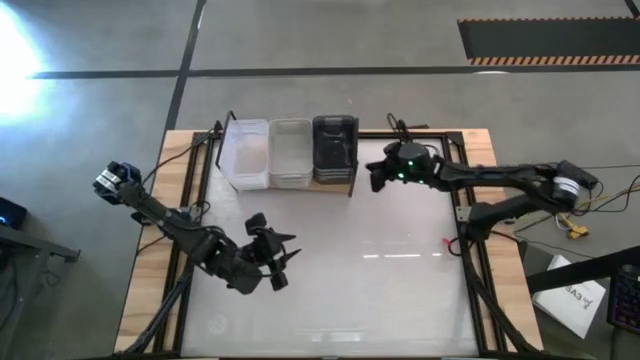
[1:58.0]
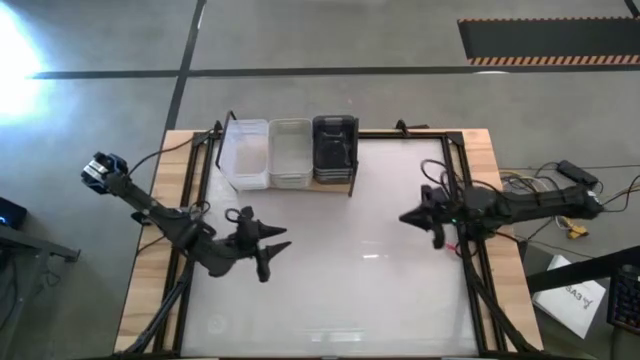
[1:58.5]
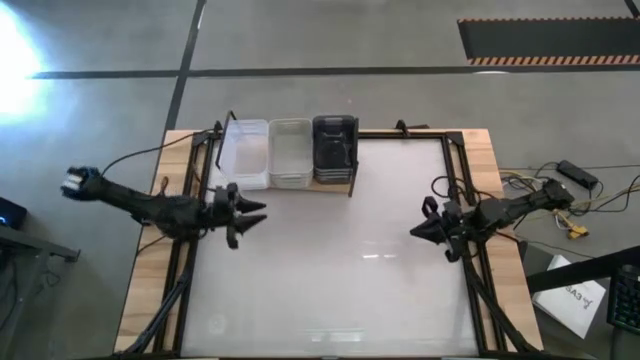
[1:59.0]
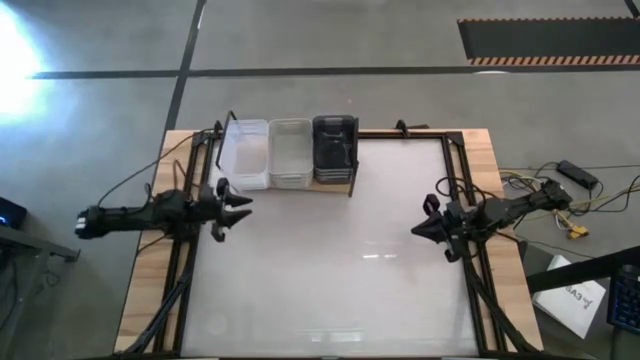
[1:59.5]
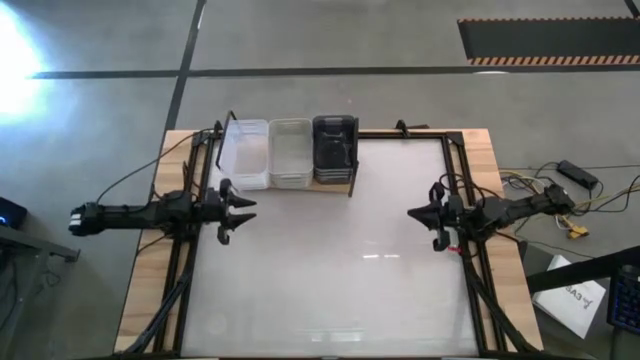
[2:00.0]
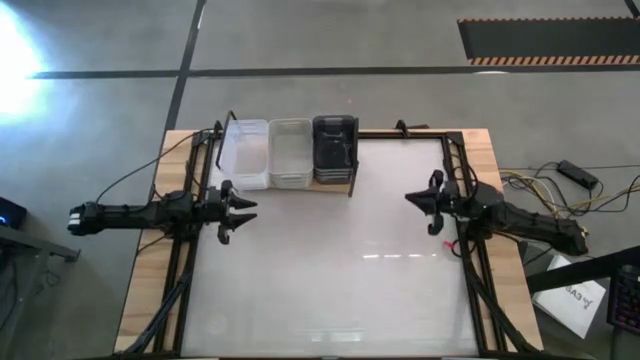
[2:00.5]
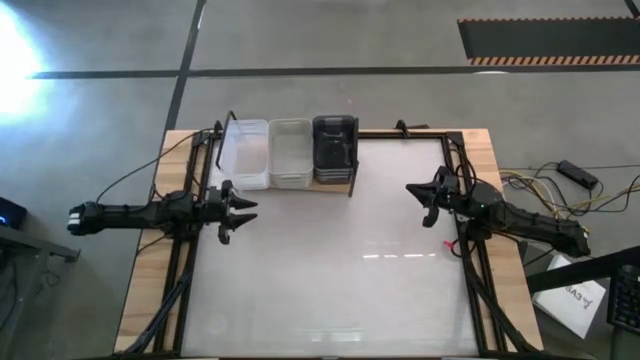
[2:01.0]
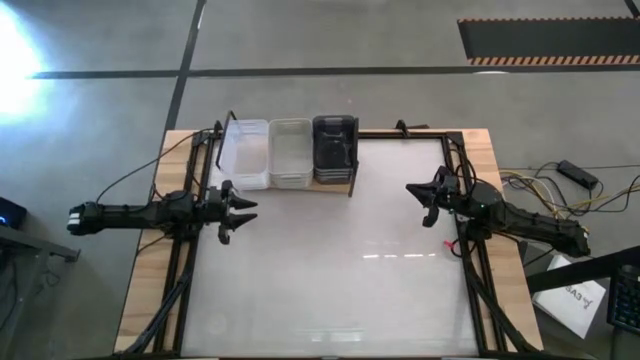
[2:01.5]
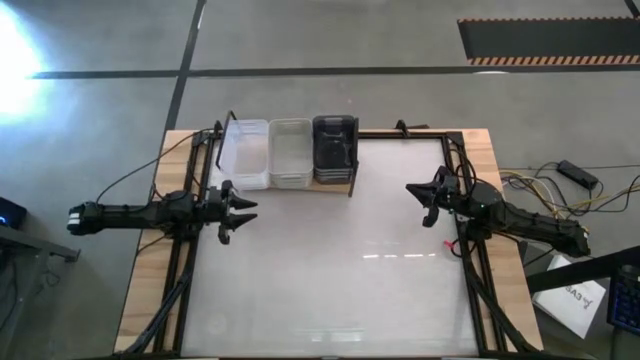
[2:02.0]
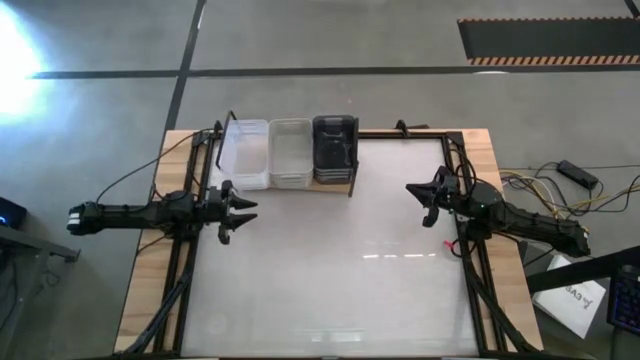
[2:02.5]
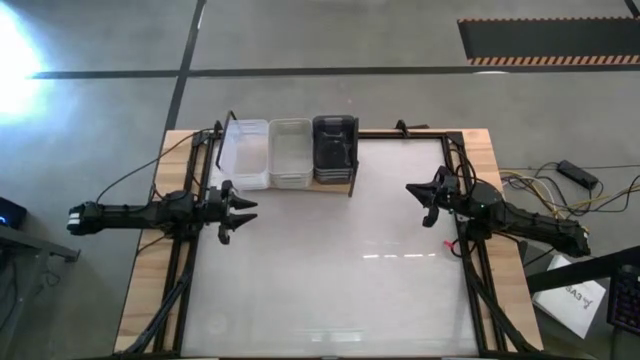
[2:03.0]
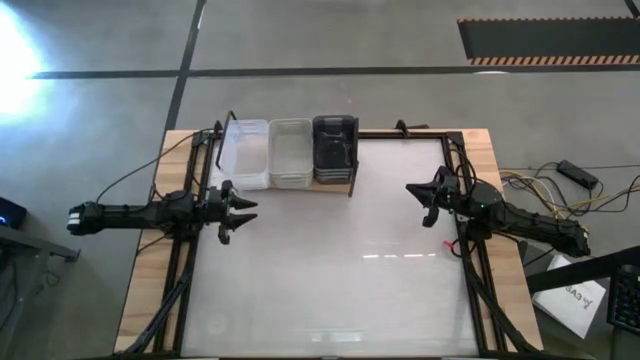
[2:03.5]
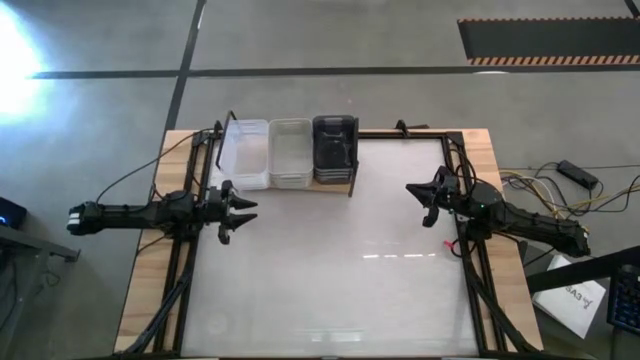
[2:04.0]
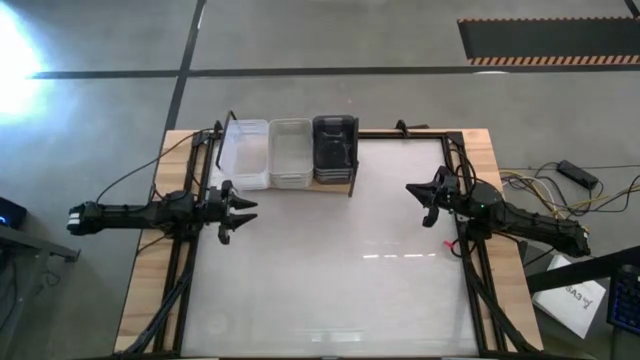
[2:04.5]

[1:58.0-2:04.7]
Task: Stack baskets on shelf by color
Return to Home Position

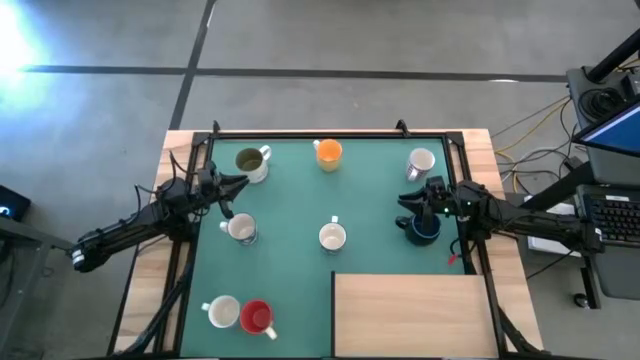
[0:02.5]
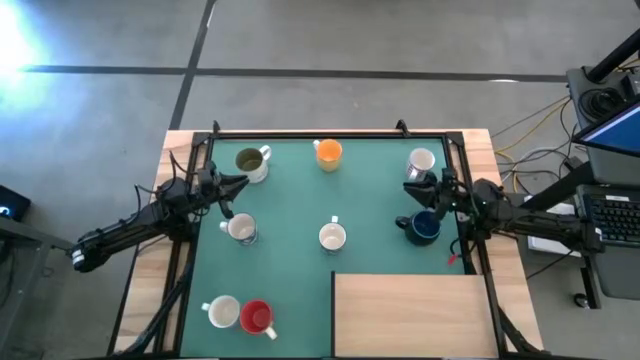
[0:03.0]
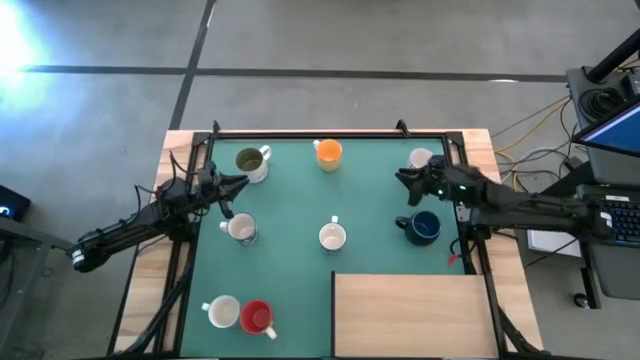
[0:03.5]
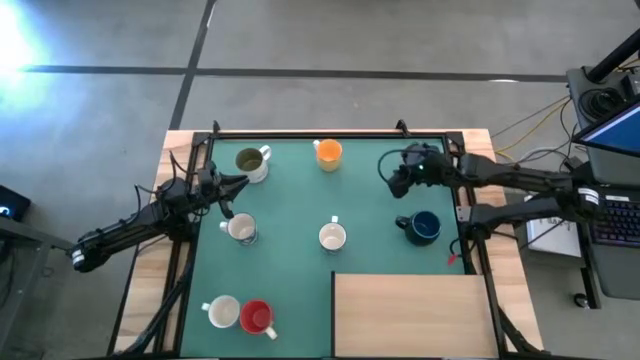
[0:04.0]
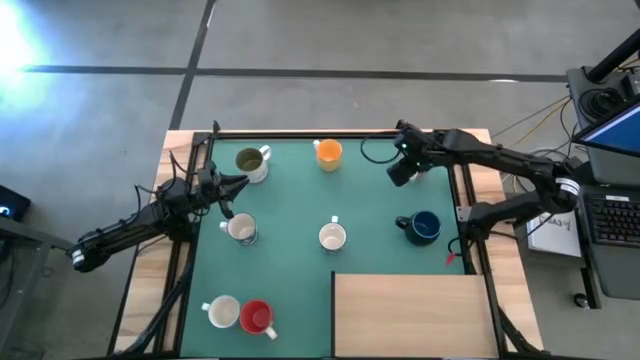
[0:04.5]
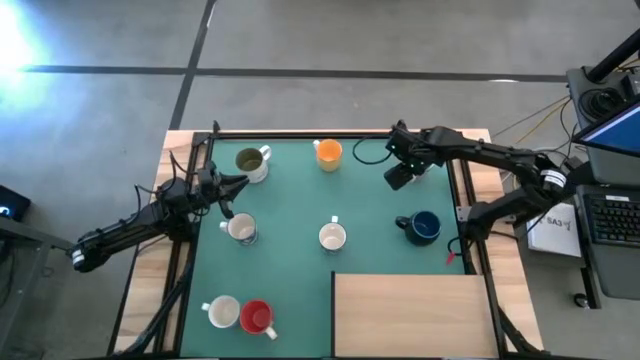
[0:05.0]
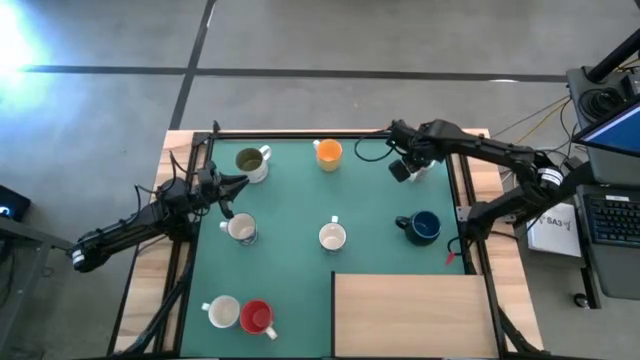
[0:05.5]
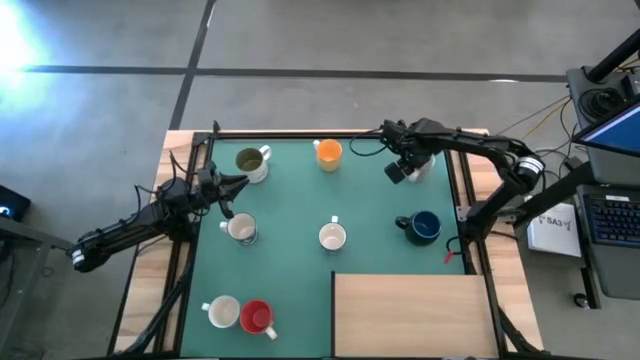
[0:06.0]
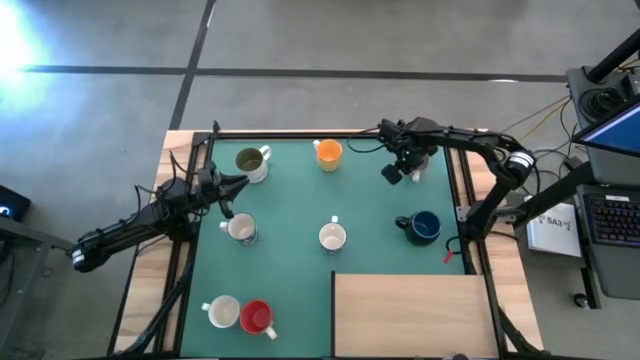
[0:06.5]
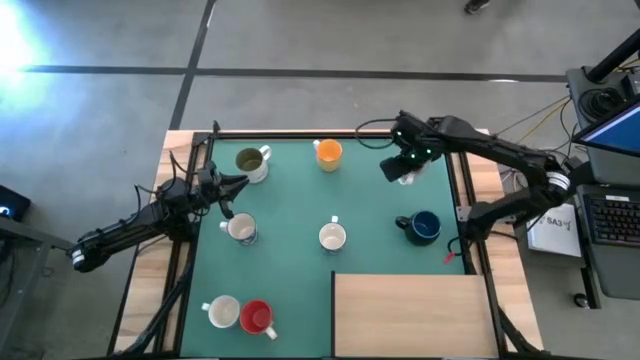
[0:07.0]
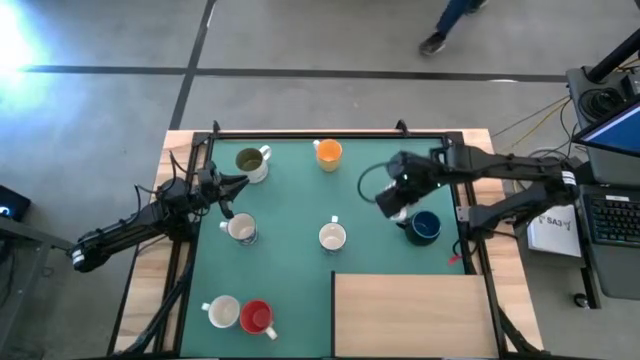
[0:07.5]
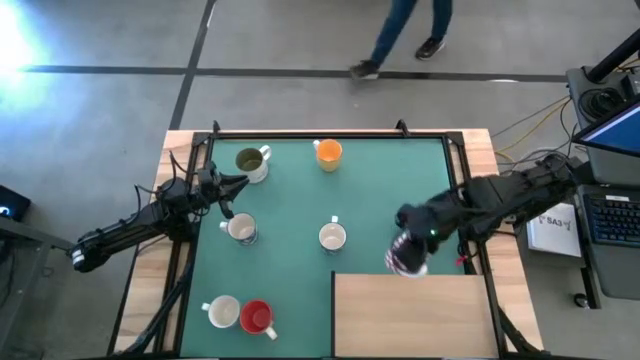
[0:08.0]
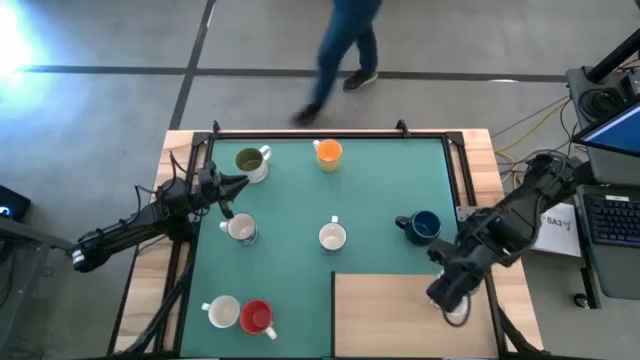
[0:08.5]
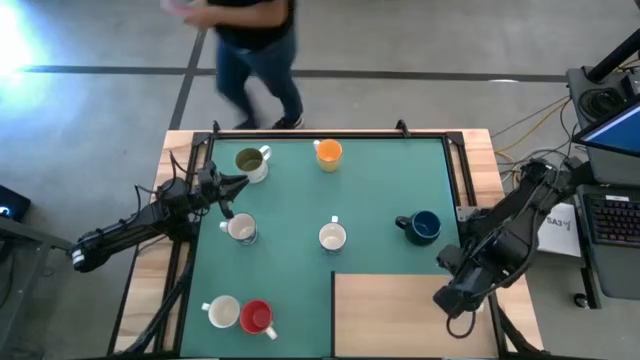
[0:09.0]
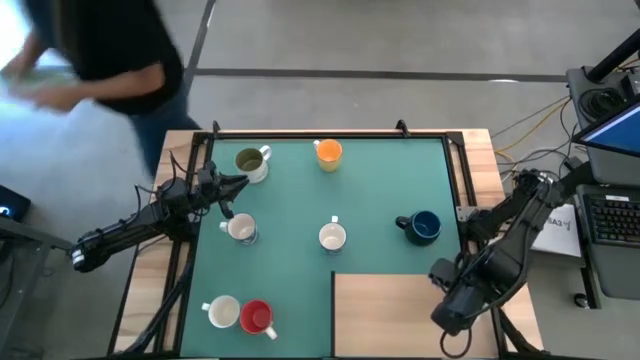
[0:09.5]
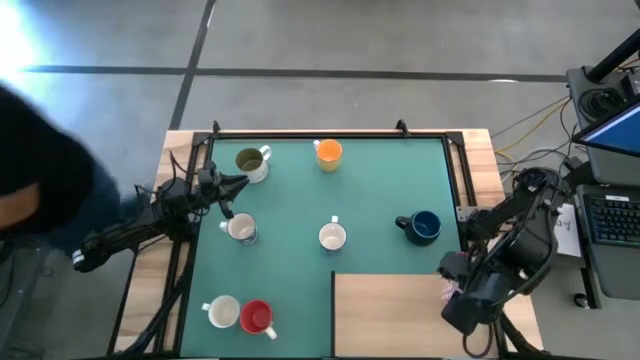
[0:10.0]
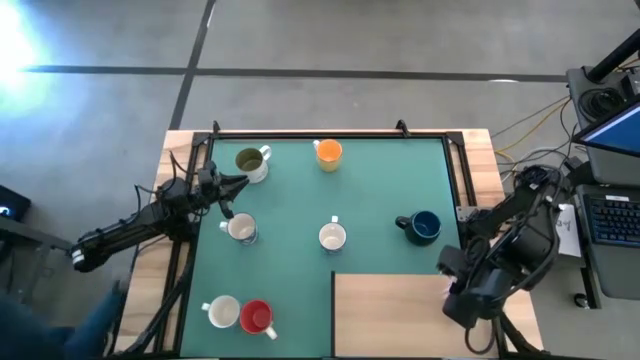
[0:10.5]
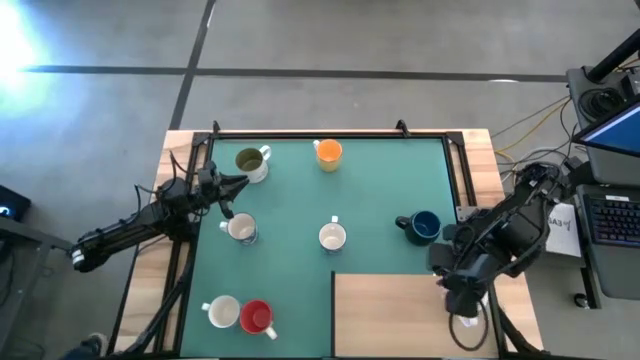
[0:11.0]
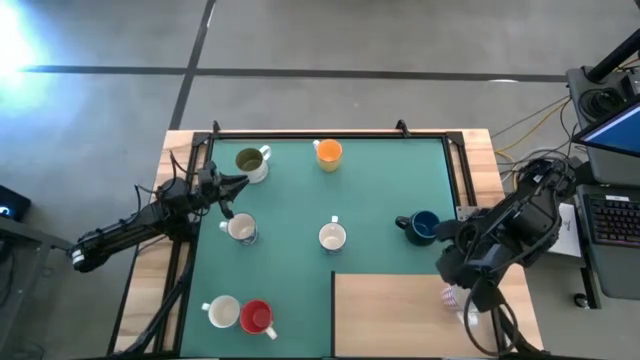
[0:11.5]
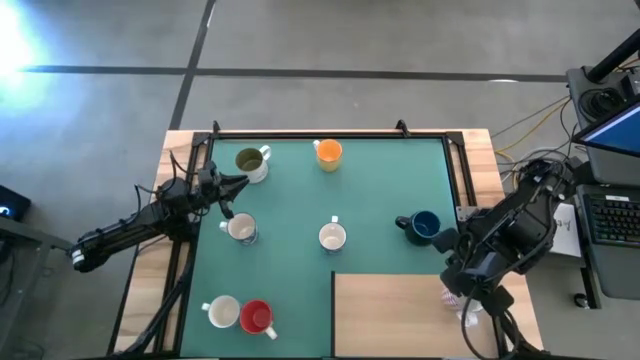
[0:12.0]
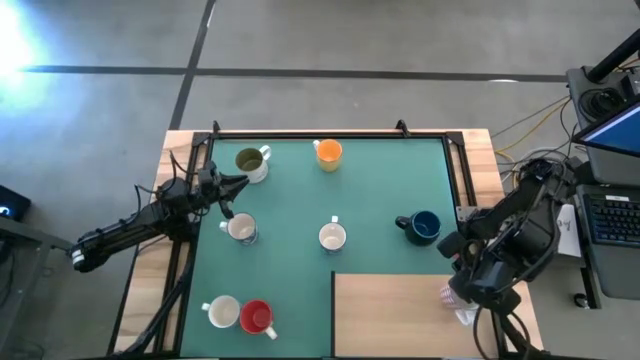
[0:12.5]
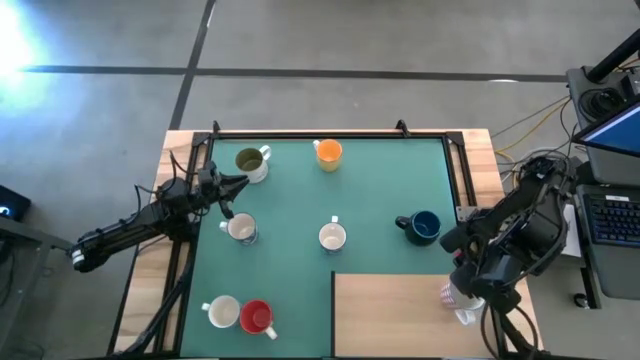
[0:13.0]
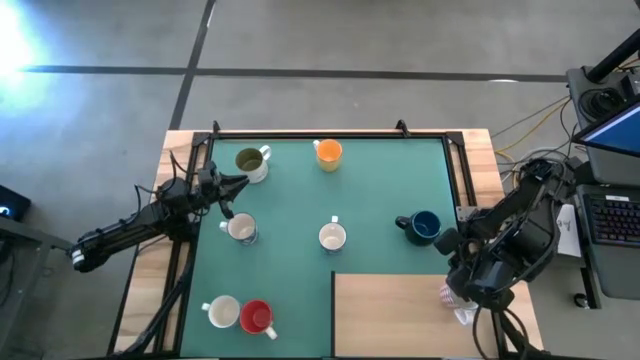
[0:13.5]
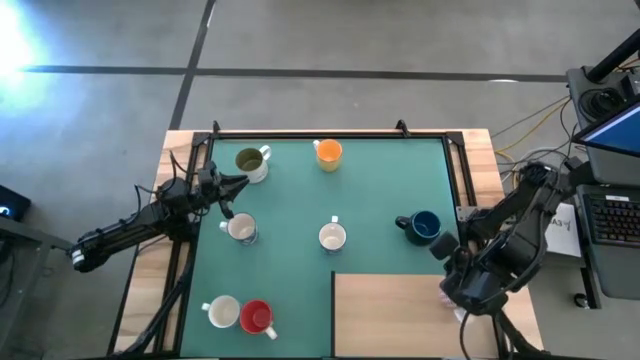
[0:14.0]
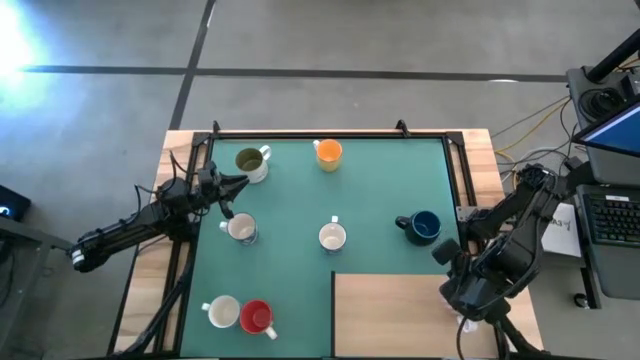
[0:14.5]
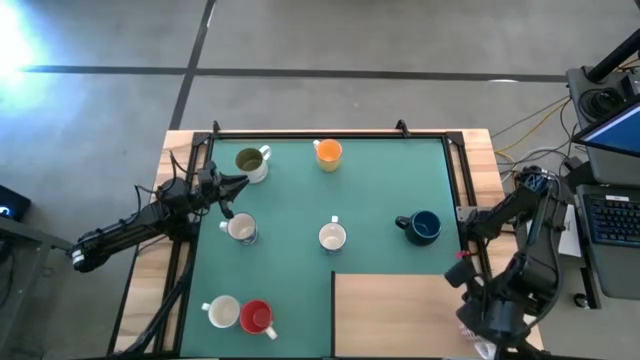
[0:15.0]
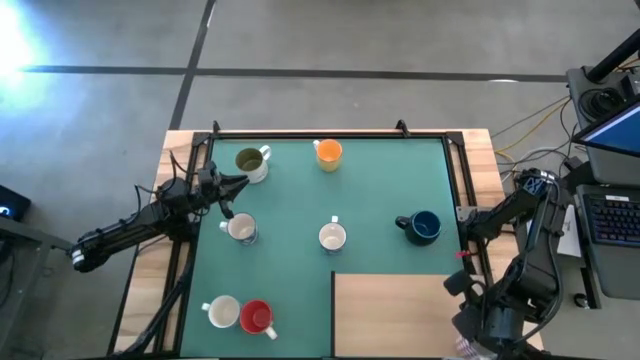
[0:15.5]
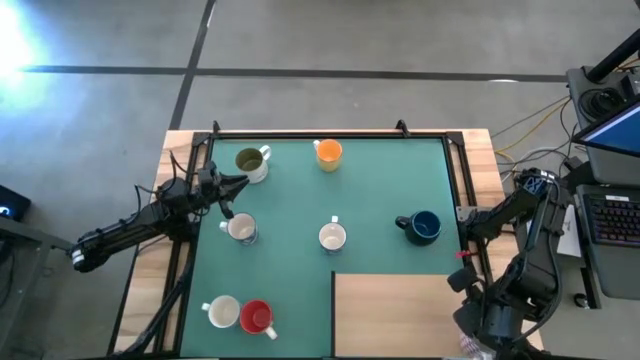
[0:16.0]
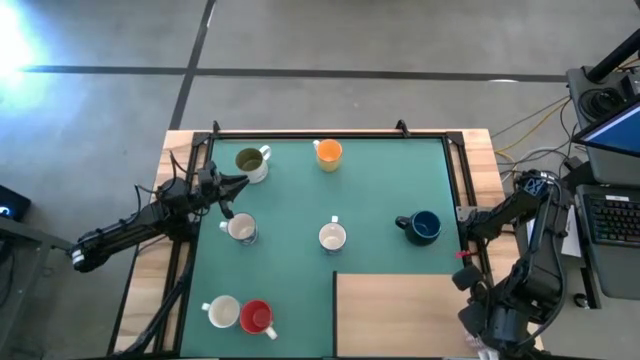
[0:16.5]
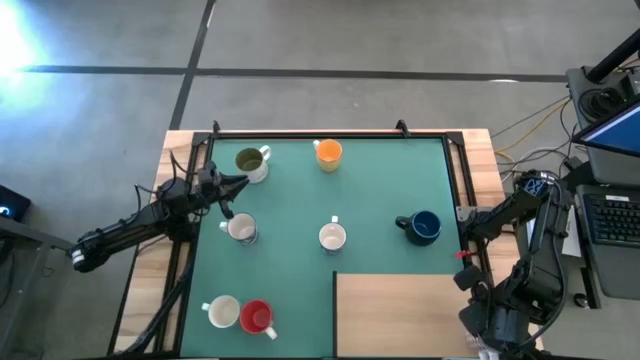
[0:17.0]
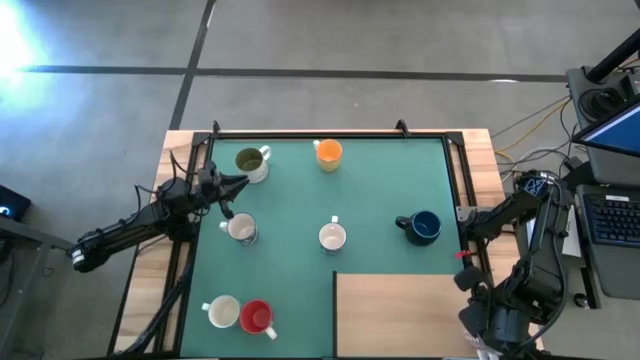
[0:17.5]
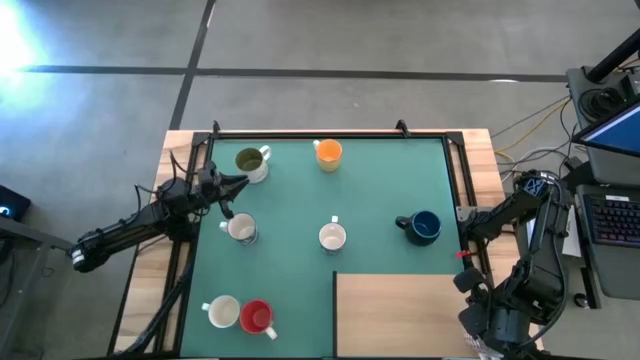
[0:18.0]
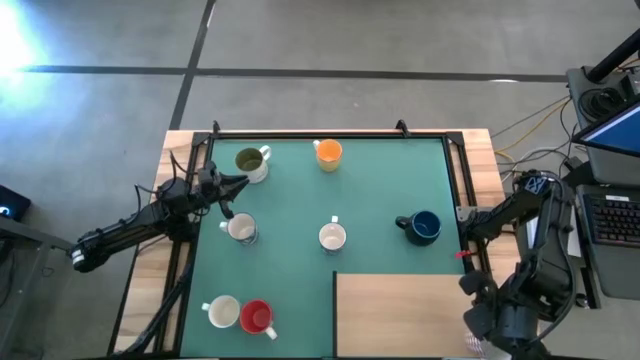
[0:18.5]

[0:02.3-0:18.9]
Task: Place coffee mugs
Put the red patterned mug on the shelf
